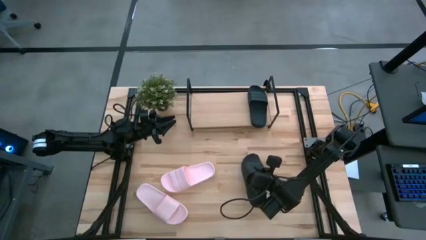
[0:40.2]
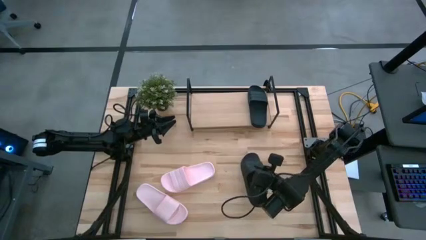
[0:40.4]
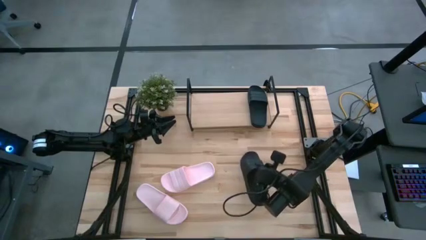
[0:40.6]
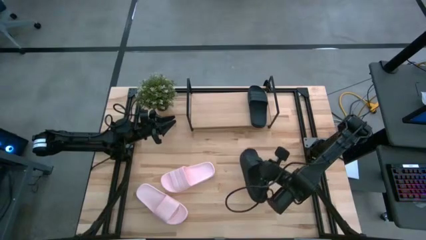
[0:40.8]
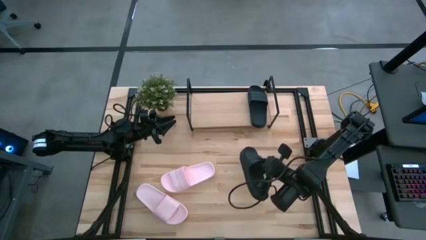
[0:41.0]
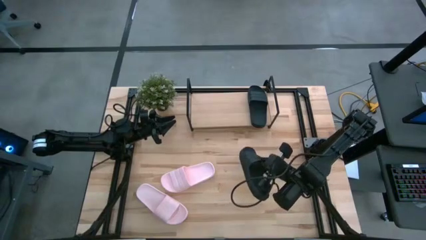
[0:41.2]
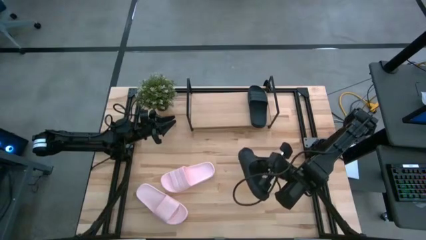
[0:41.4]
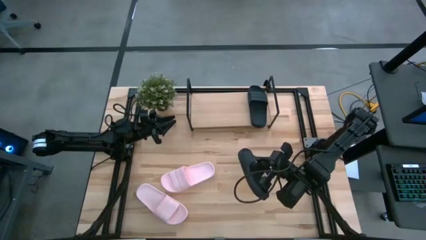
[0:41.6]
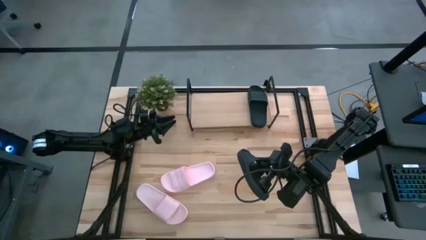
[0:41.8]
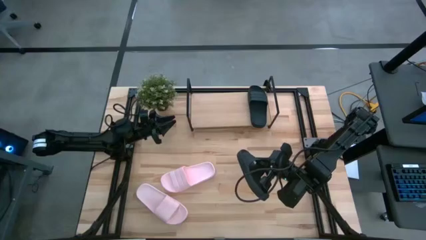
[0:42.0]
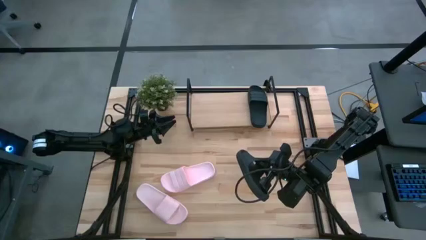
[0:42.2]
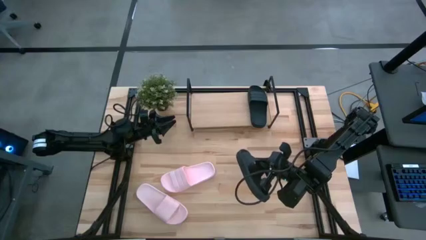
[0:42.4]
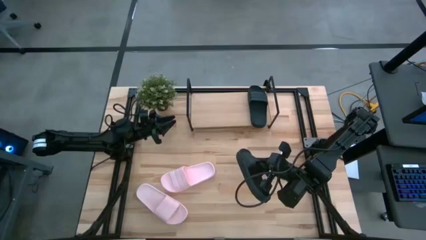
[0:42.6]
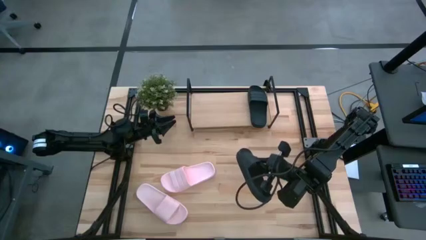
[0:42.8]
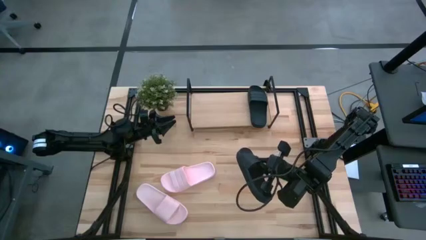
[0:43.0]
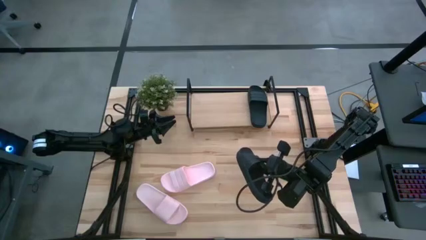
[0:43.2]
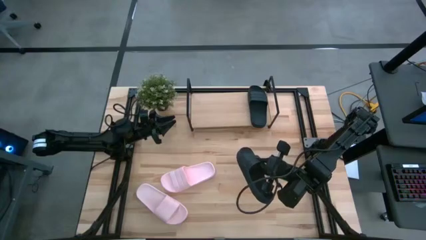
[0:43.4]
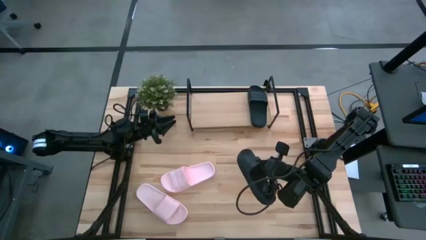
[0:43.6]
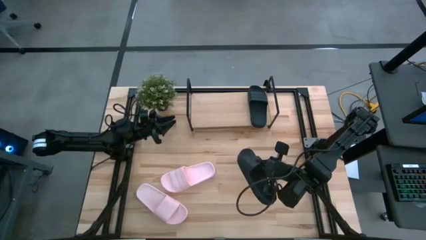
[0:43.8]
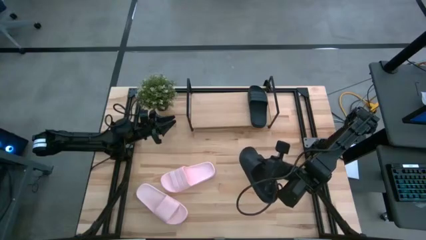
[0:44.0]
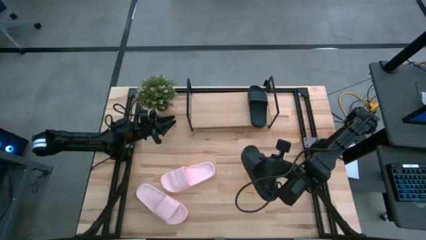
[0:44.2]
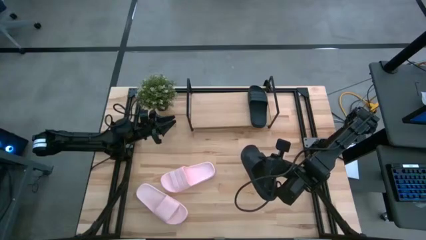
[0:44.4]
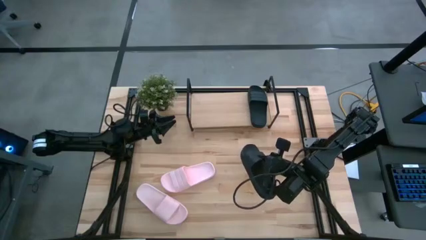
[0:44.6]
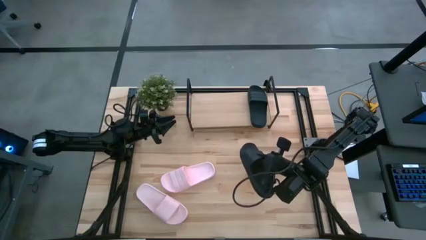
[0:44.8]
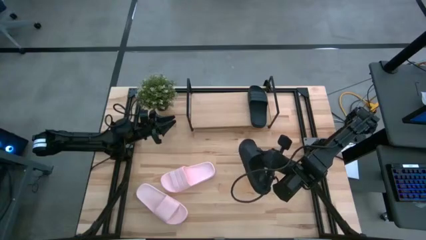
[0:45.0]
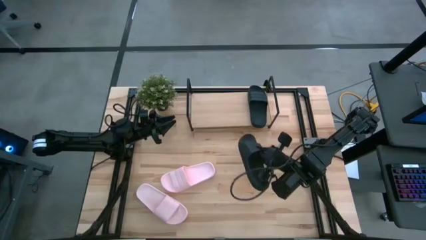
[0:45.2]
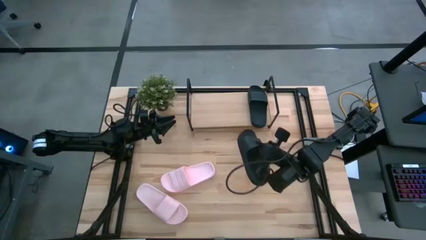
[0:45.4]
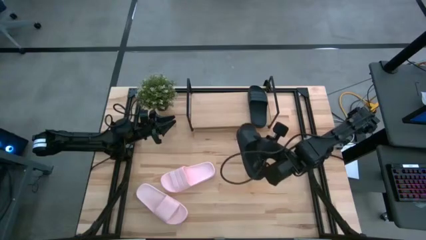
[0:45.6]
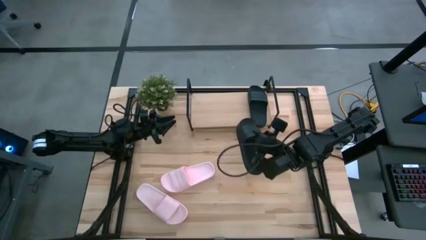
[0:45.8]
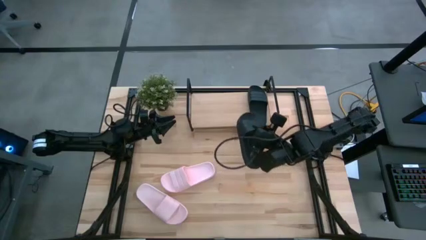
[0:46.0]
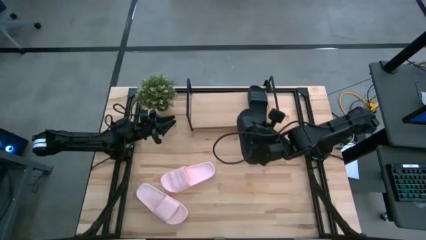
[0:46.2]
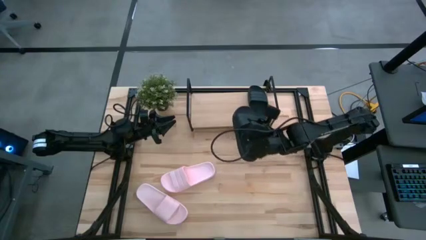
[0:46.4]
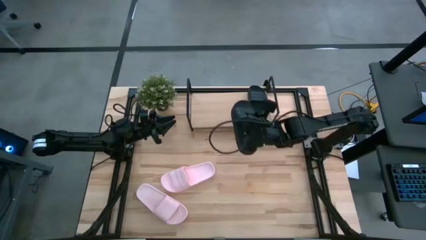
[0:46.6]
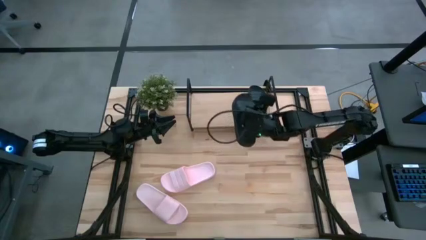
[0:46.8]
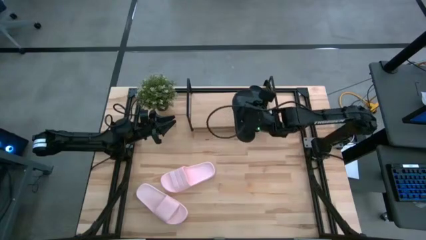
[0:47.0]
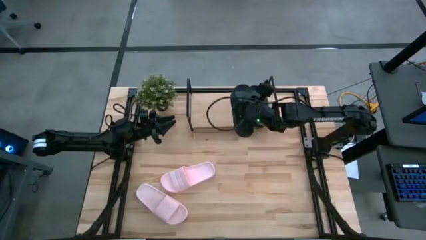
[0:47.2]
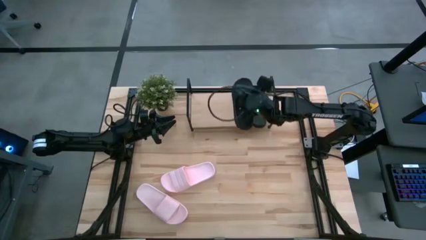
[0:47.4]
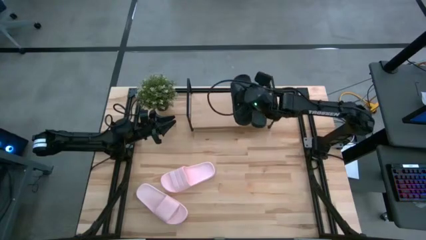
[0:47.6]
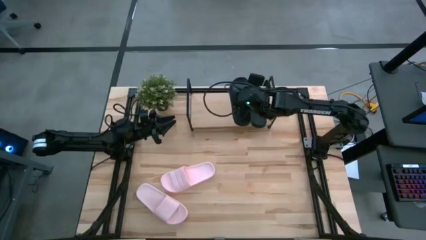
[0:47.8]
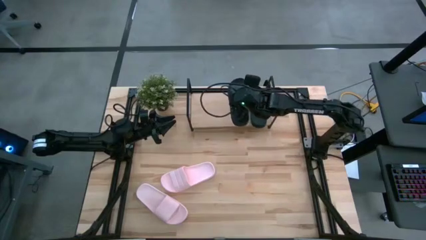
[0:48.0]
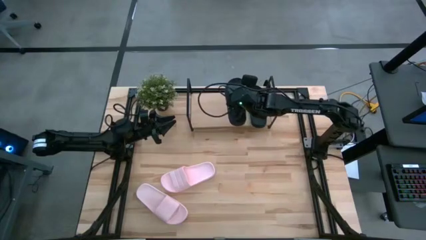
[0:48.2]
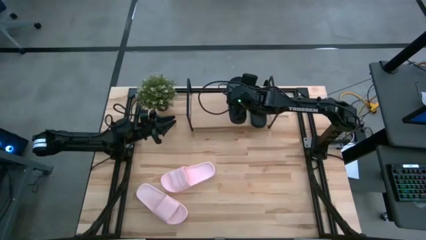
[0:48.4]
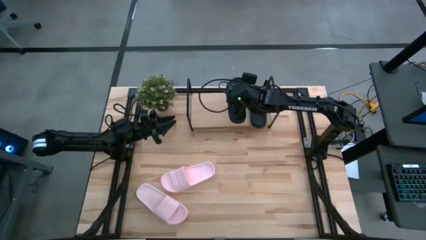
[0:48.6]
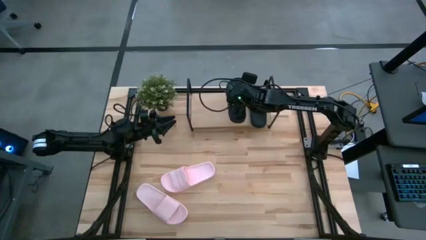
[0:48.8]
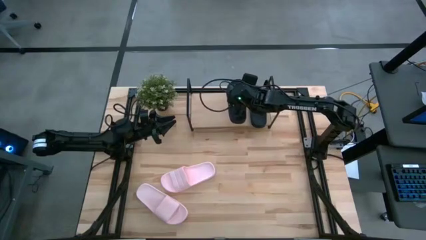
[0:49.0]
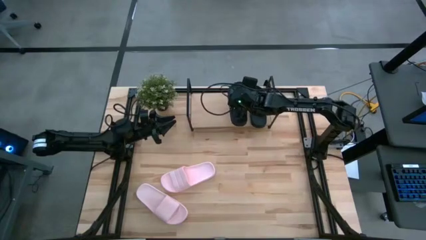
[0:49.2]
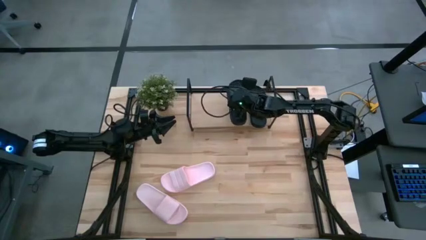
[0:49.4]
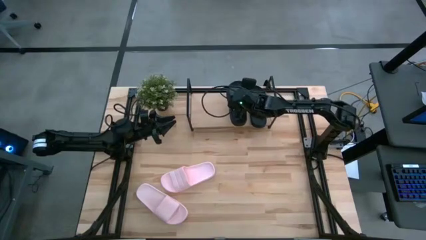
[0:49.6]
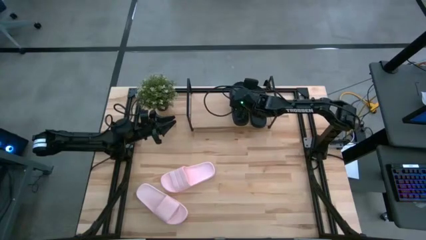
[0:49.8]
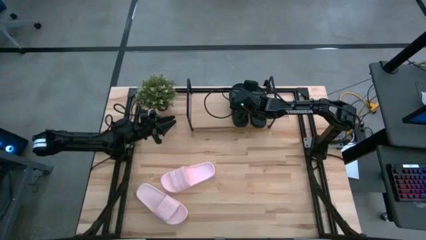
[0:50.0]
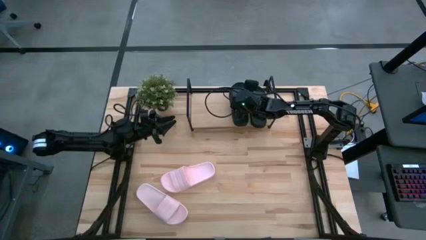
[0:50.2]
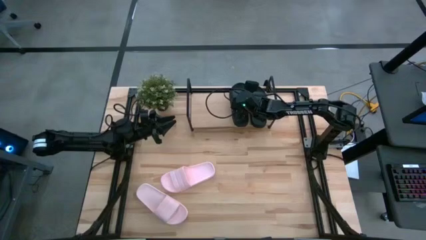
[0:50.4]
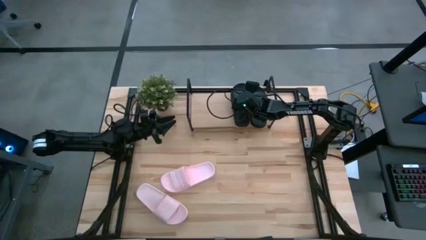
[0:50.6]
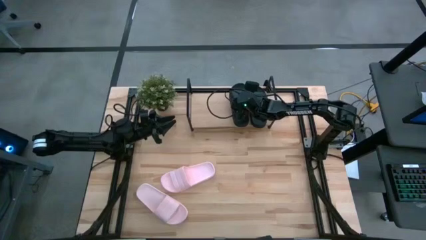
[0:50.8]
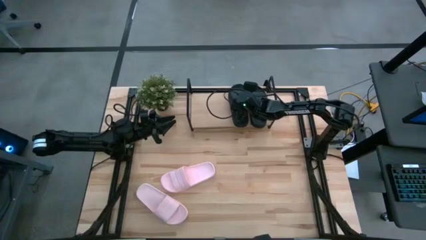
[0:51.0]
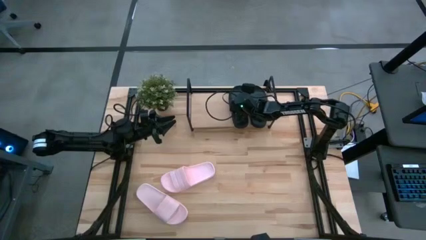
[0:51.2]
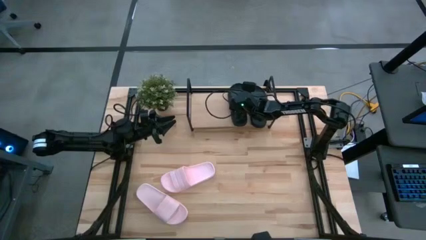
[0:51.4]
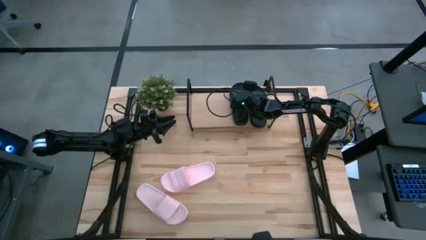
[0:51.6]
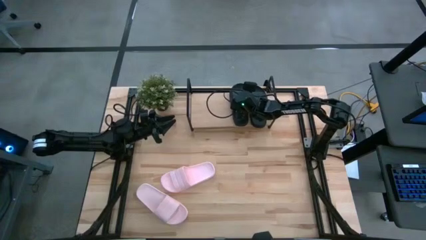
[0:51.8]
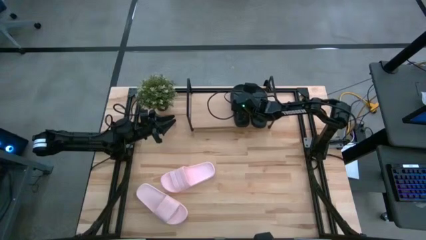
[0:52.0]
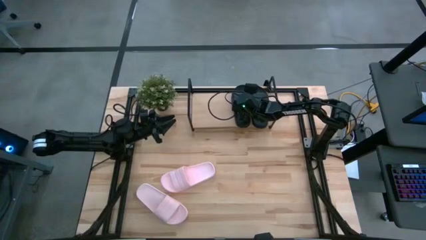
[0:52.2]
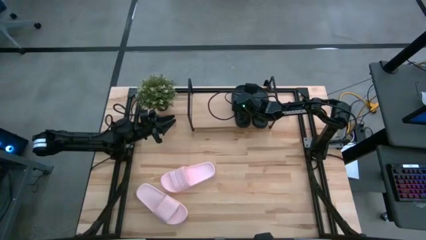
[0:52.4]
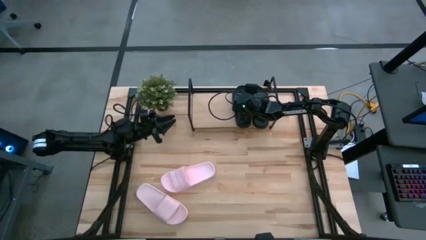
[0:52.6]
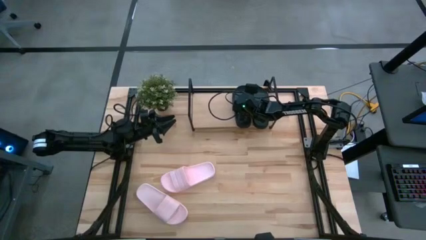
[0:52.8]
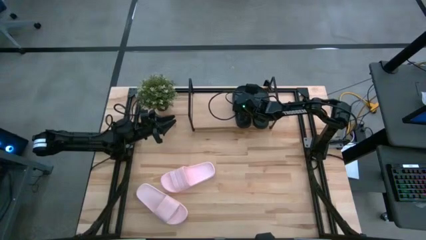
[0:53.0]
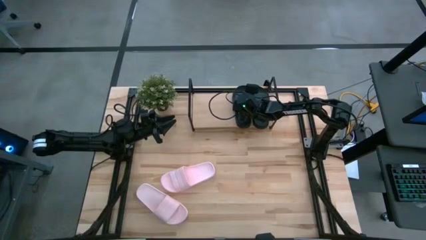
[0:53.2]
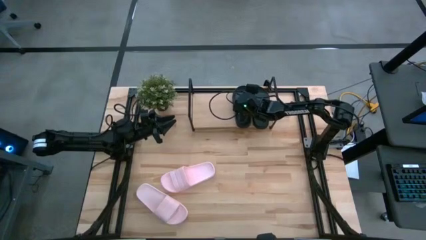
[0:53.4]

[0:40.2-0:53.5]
Task: Pick and place slides into the shelf
Put the black slipper on the shelf
